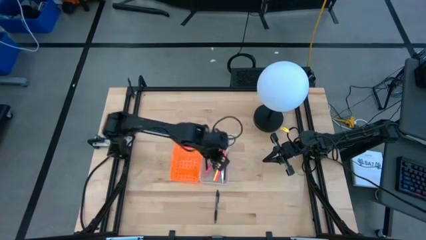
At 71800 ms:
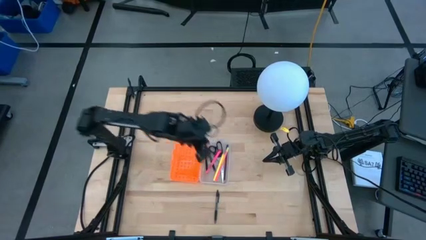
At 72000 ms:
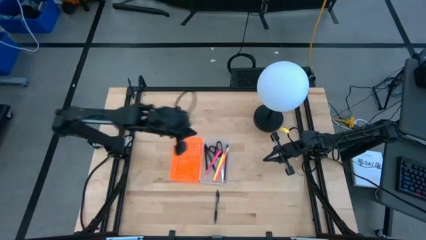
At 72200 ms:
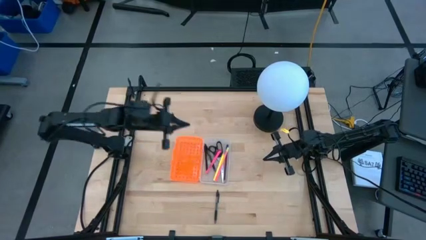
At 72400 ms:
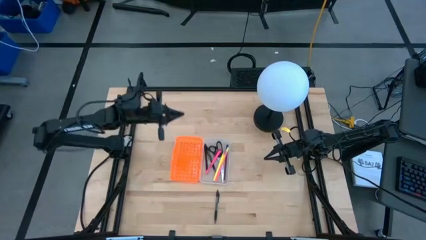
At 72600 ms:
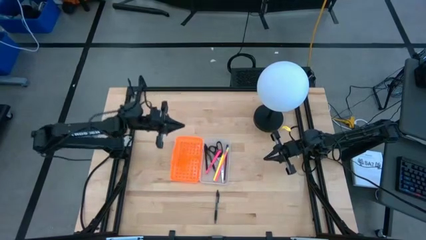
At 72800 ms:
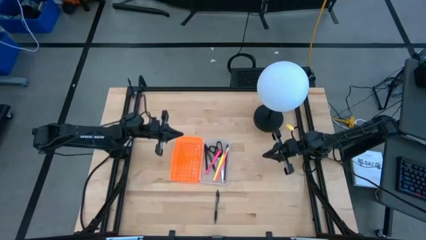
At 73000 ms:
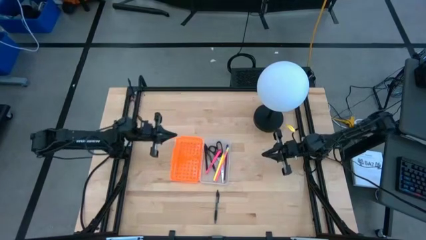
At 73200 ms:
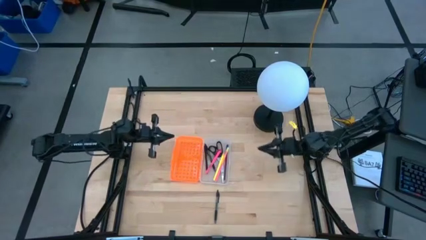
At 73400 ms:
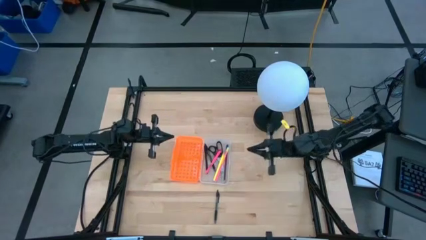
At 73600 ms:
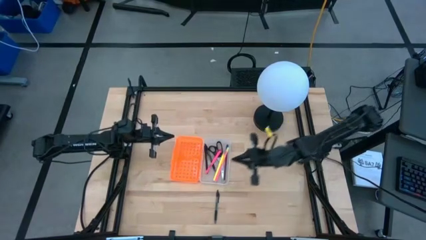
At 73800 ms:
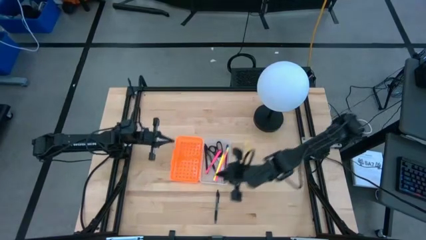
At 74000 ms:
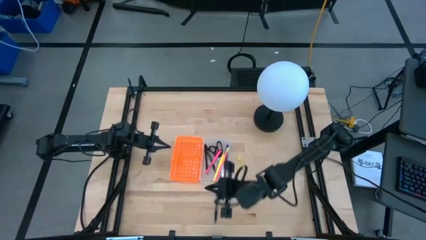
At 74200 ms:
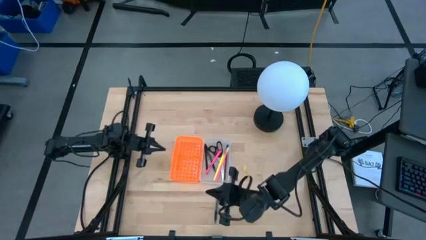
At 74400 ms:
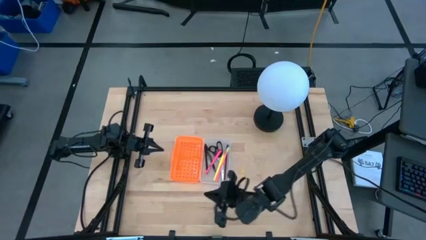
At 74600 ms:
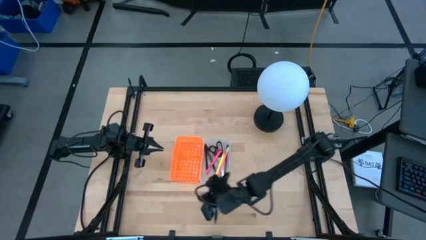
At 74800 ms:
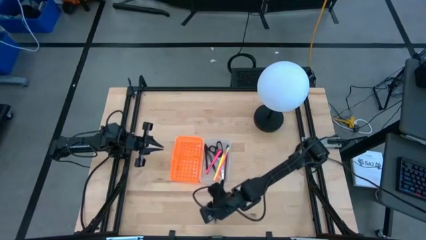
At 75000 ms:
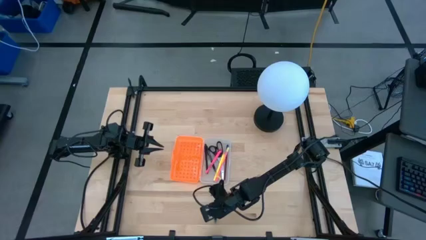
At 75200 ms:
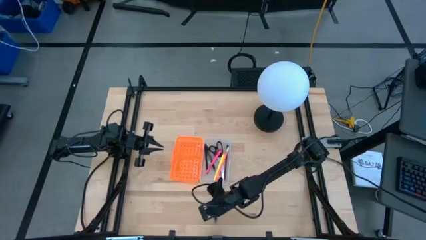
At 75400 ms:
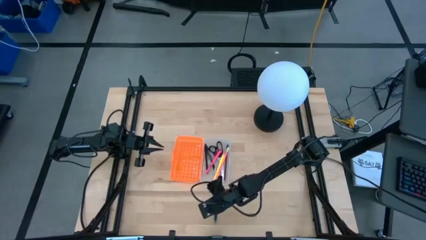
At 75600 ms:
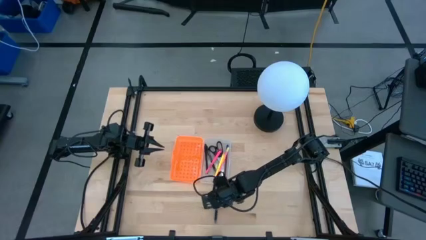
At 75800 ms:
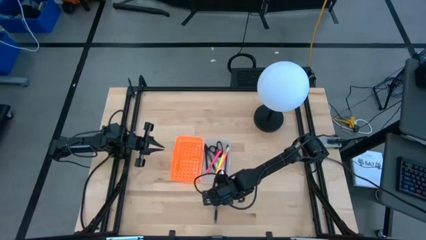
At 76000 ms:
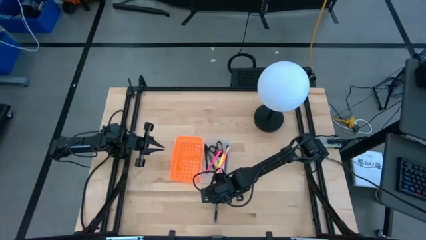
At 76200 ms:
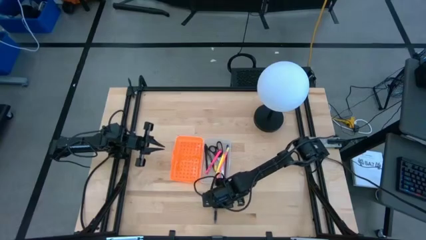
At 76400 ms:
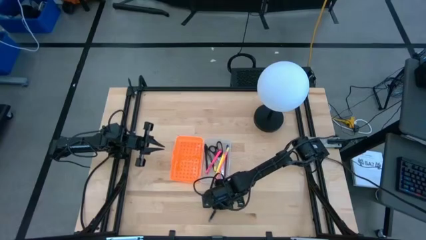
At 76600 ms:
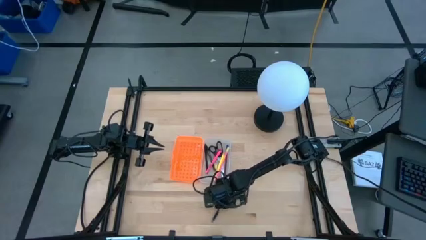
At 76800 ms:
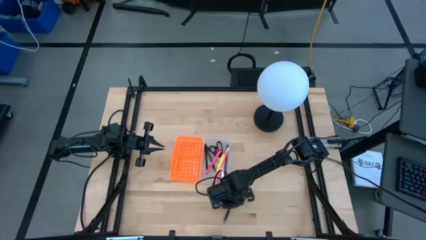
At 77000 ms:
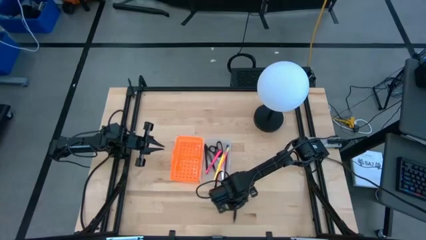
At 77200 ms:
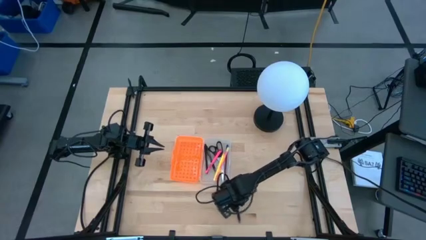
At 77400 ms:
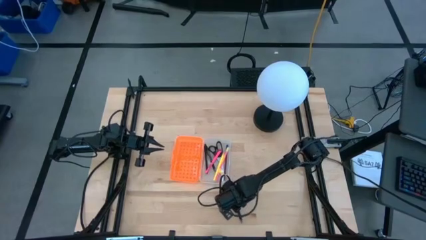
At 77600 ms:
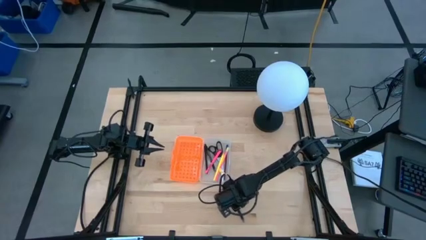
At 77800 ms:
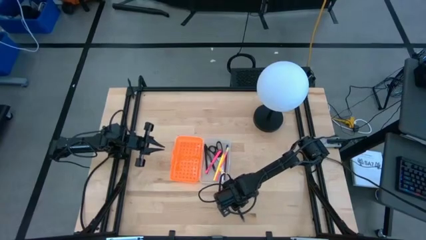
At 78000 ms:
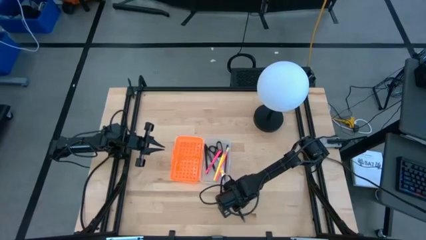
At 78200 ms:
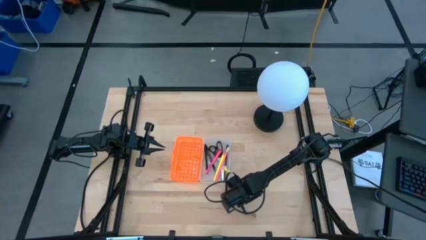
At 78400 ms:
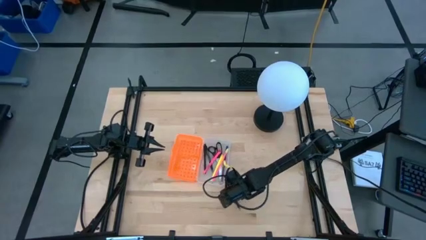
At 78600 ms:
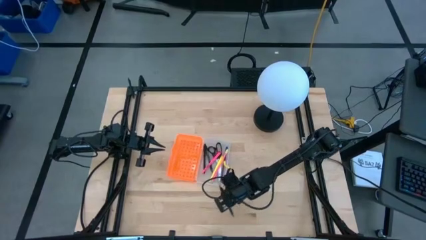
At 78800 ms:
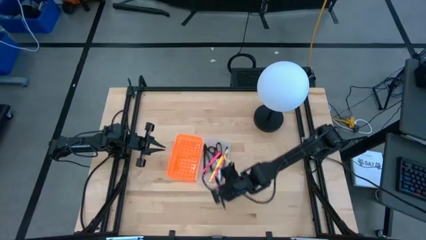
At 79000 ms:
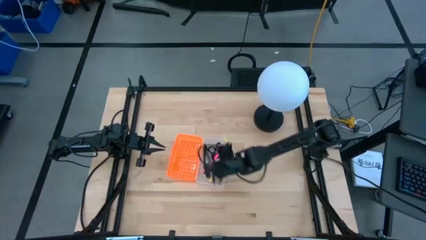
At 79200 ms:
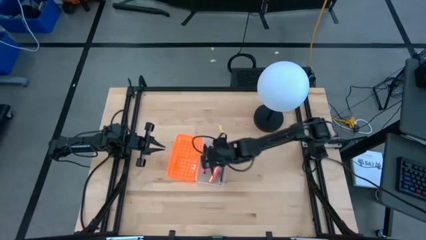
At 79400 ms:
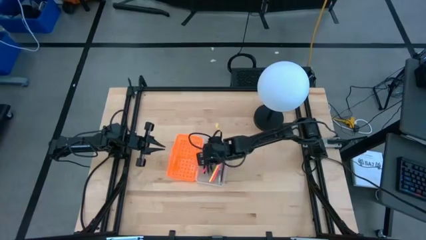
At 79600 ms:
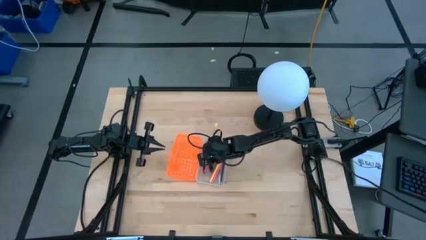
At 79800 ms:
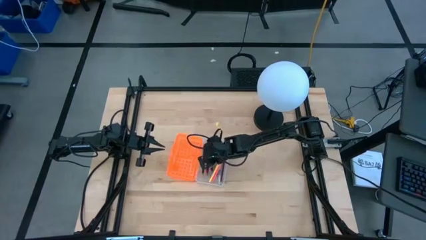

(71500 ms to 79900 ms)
Task: Pick & place school supplies into a supply box
Put the black pen into the supply box

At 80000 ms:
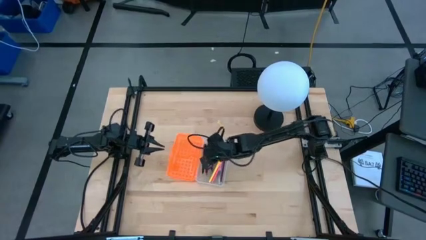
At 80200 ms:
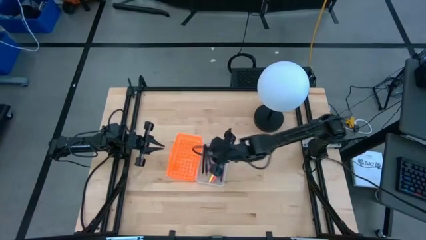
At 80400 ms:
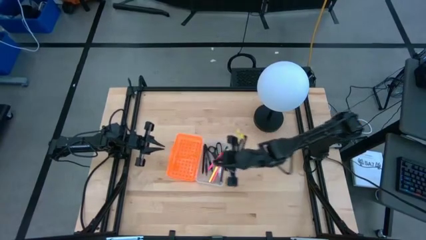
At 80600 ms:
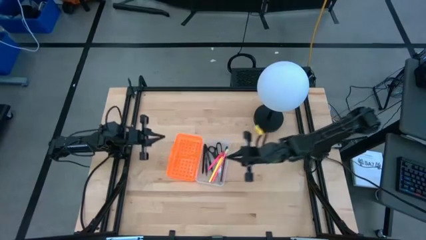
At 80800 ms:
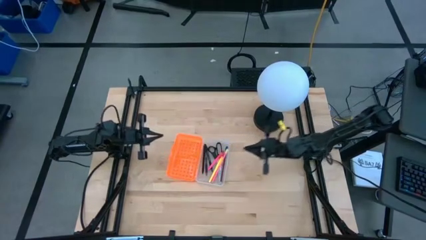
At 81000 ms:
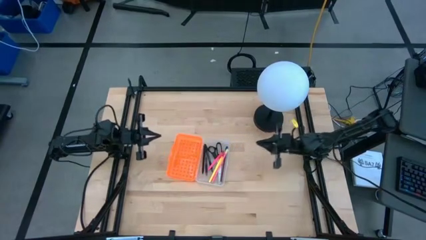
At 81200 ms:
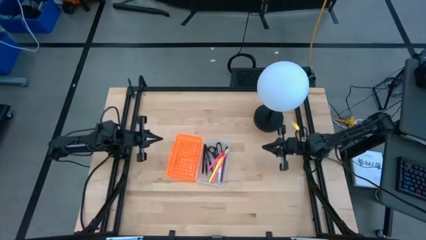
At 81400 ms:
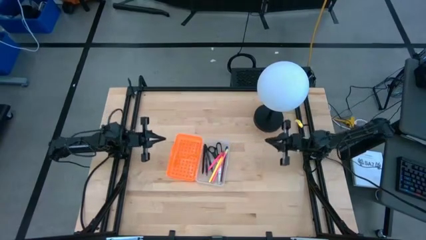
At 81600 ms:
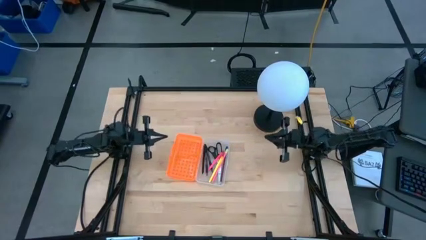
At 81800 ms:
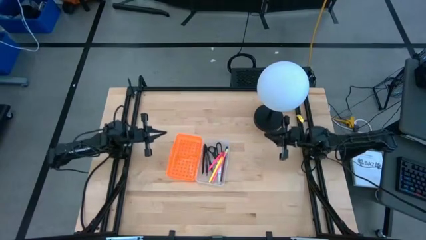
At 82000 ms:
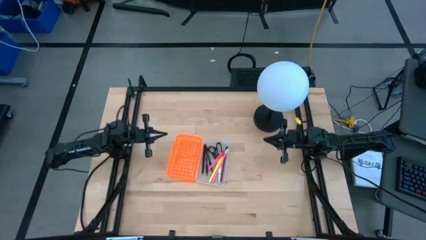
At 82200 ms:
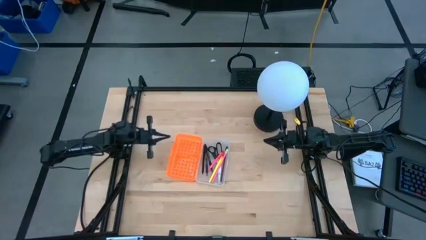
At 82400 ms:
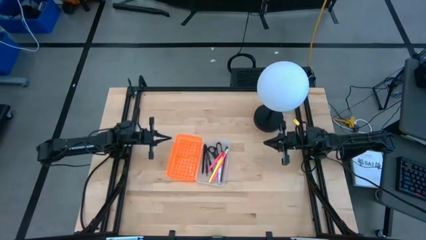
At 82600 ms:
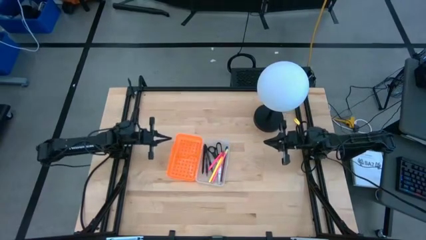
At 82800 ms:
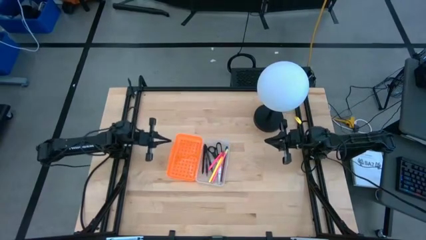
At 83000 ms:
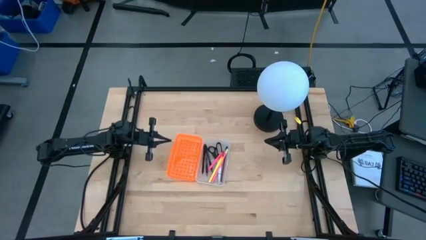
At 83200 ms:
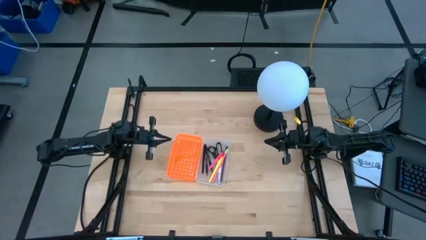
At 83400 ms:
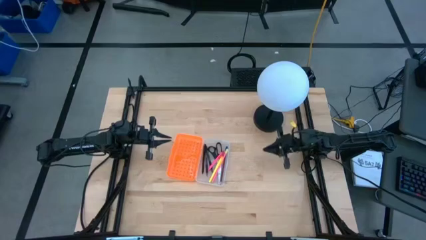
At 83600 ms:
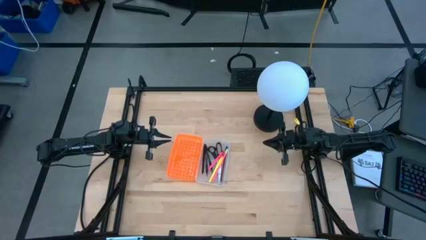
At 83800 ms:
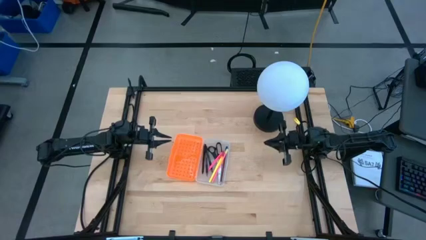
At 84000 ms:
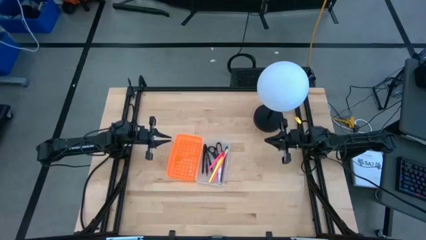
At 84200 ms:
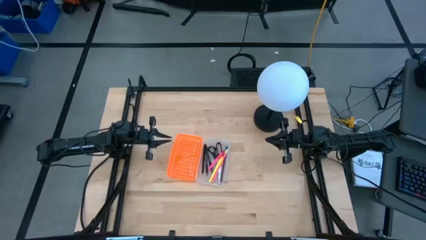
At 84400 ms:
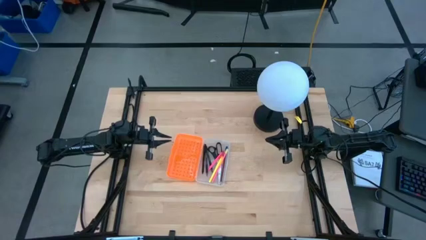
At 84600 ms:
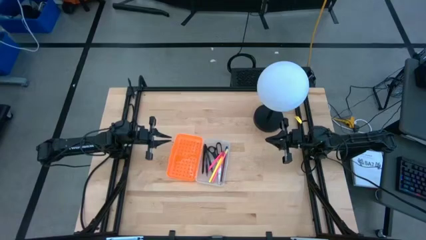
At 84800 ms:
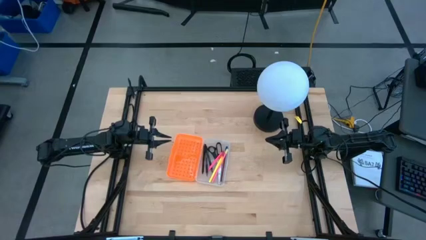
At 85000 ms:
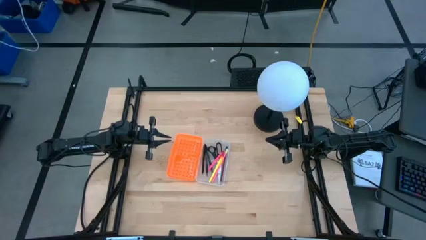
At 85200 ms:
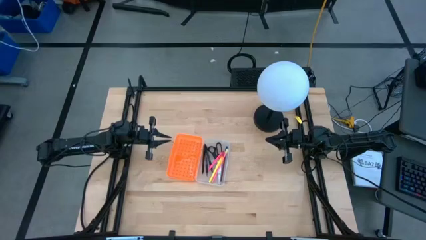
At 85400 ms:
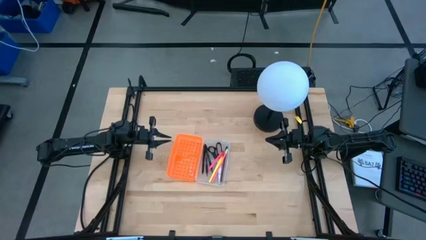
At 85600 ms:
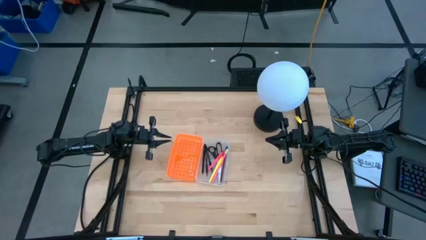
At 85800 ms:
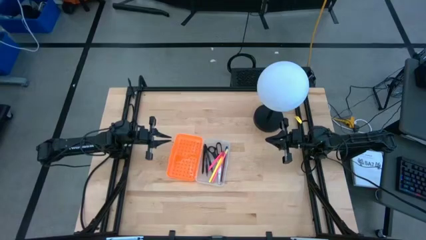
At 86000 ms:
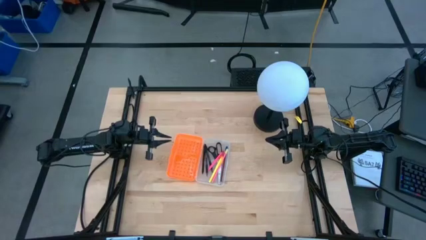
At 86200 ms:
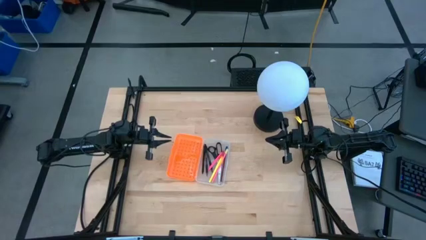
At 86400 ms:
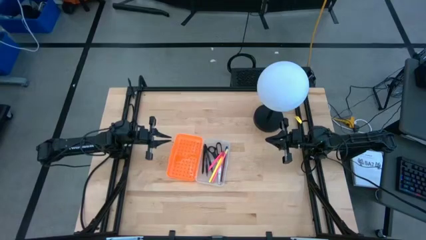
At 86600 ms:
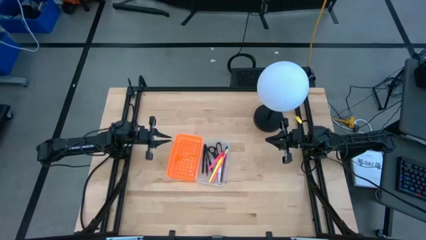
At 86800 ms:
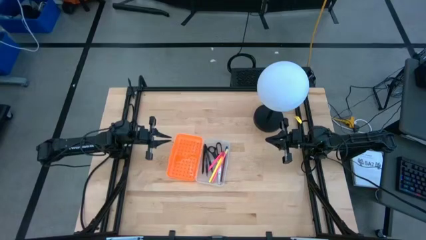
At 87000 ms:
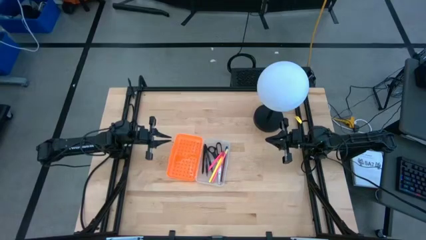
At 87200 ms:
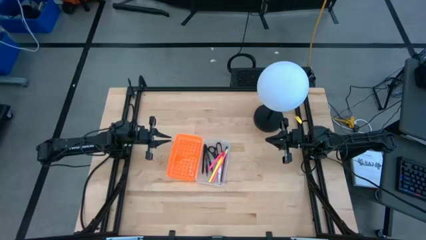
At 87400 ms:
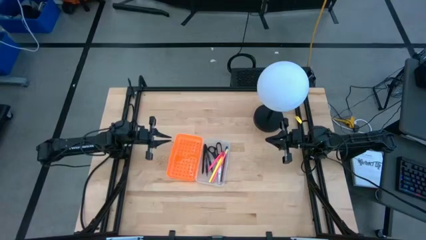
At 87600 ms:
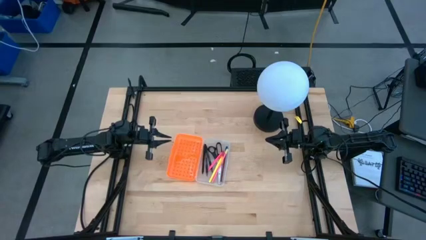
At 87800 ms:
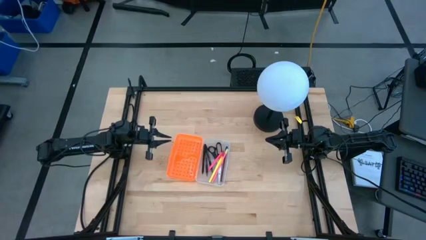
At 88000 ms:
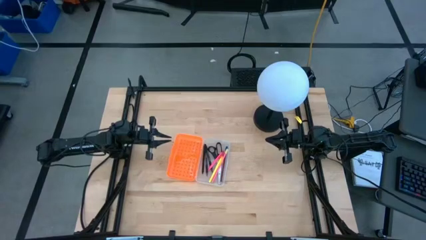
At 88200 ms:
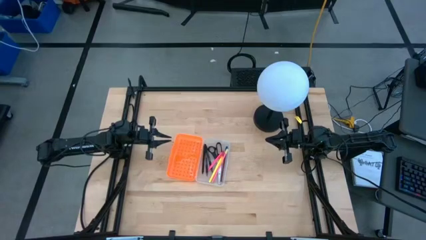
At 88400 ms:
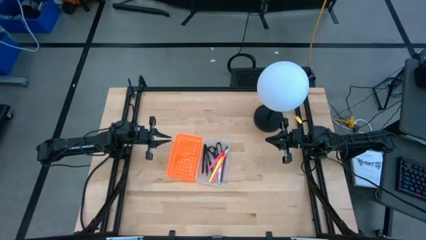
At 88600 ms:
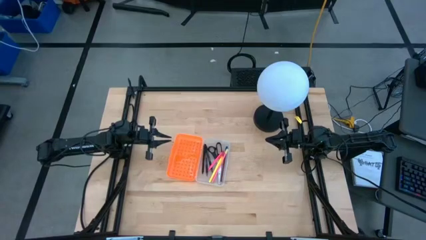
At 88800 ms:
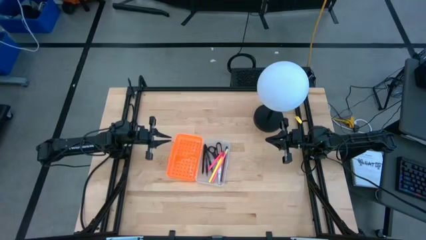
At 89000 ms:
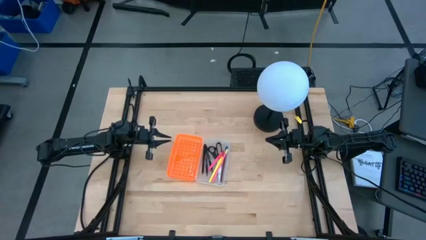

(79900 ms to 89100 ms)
Return to Home Position
